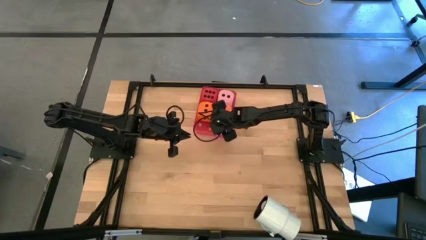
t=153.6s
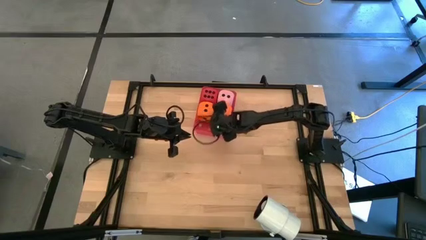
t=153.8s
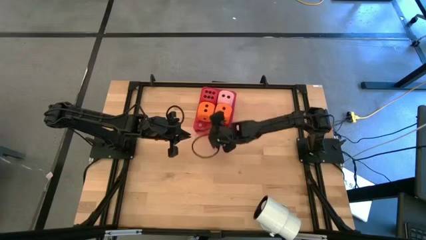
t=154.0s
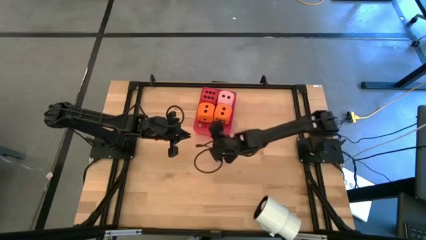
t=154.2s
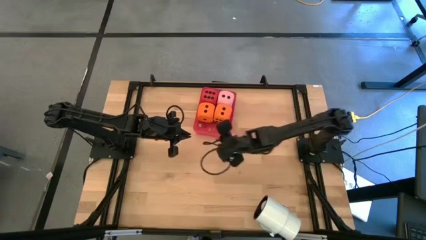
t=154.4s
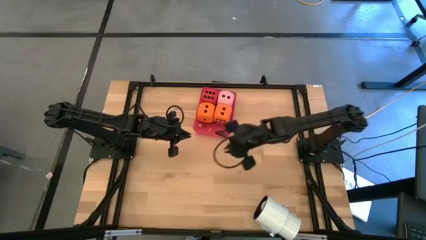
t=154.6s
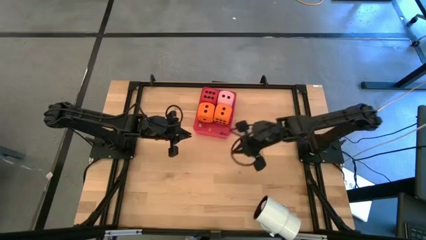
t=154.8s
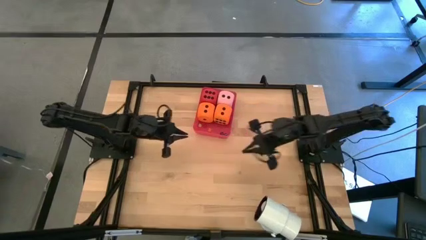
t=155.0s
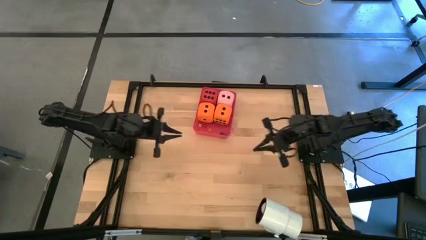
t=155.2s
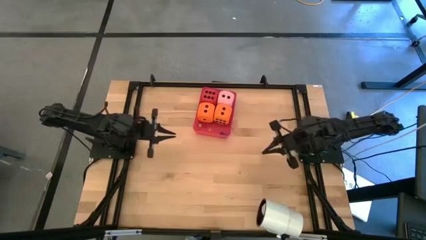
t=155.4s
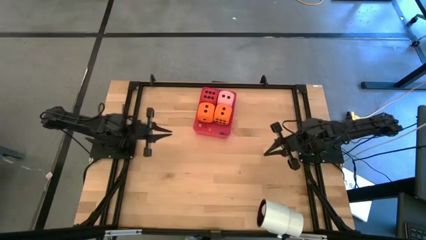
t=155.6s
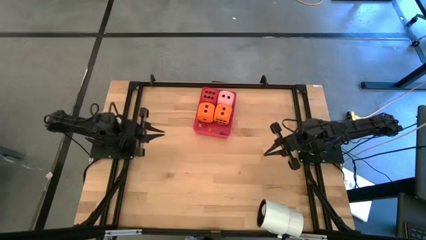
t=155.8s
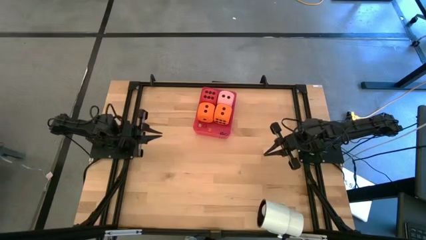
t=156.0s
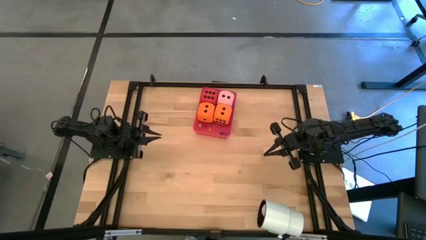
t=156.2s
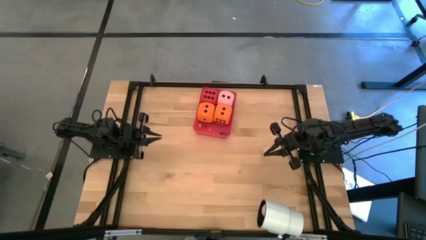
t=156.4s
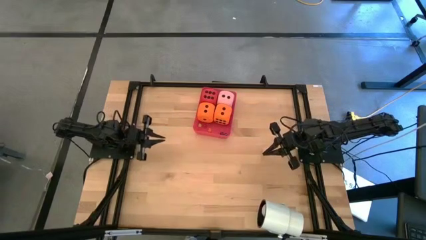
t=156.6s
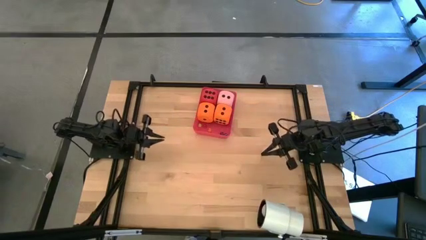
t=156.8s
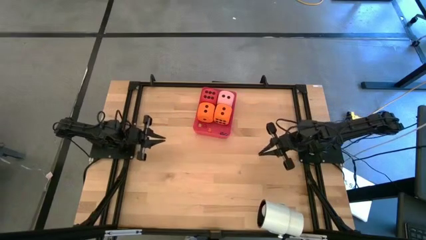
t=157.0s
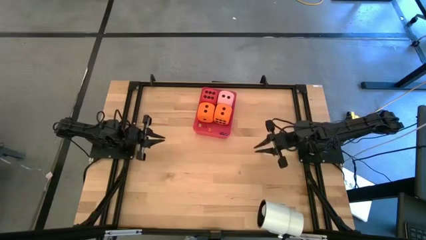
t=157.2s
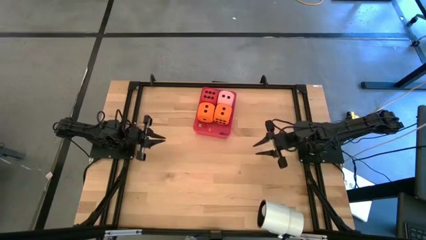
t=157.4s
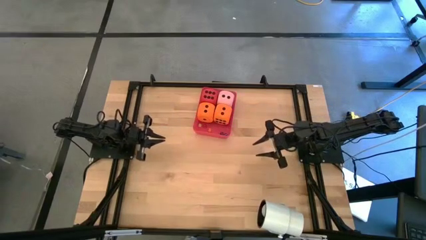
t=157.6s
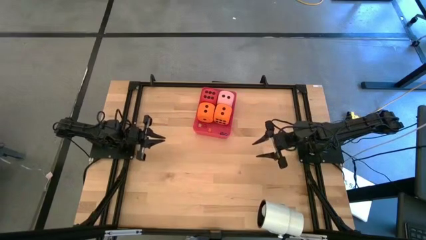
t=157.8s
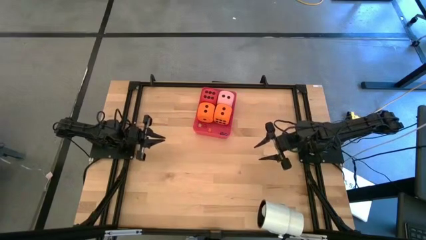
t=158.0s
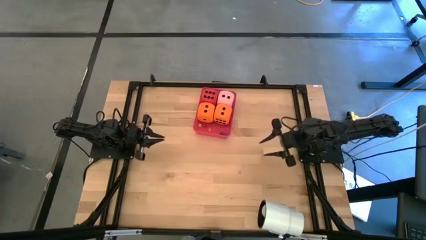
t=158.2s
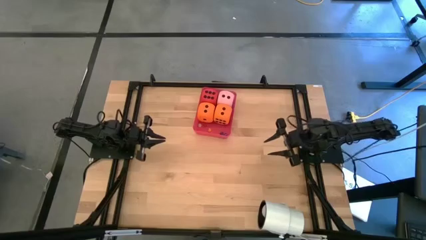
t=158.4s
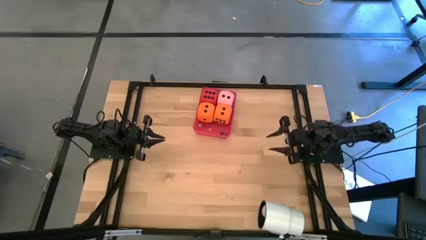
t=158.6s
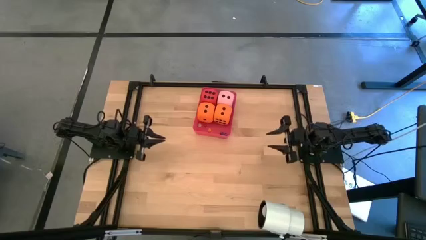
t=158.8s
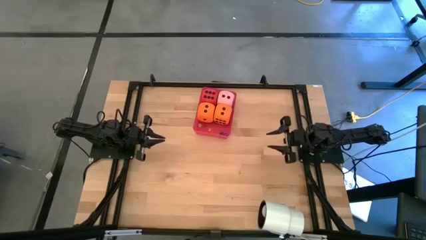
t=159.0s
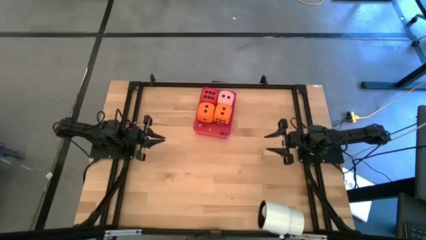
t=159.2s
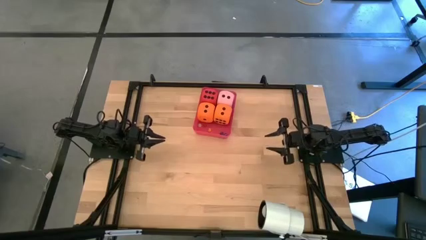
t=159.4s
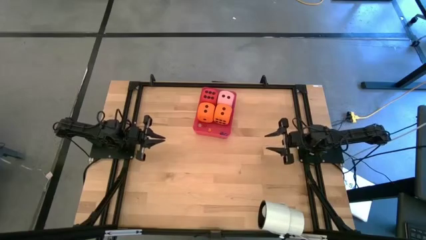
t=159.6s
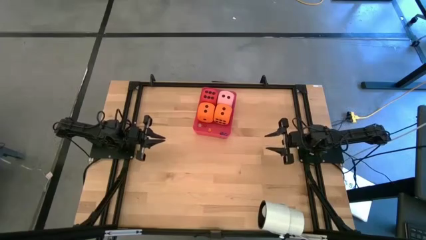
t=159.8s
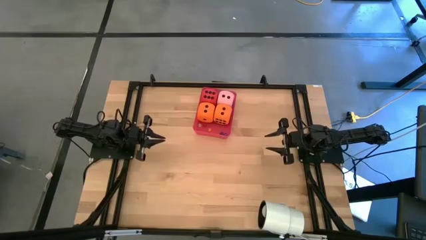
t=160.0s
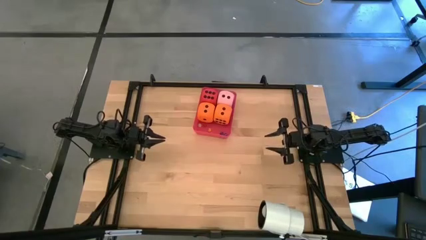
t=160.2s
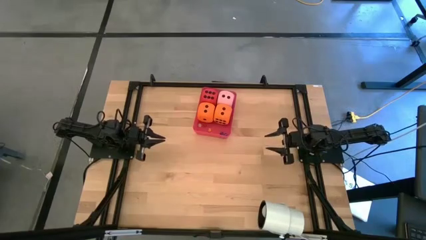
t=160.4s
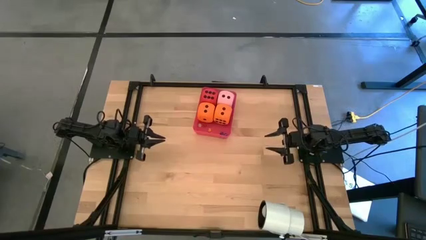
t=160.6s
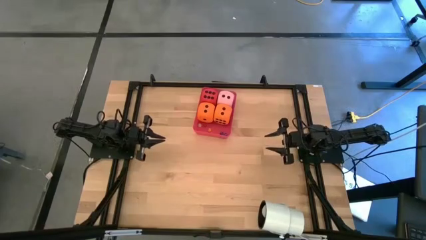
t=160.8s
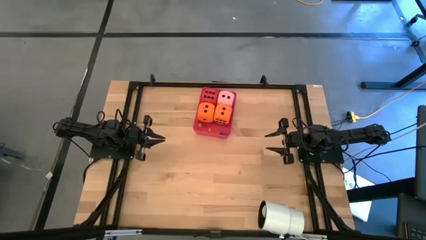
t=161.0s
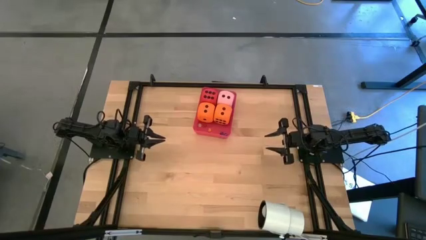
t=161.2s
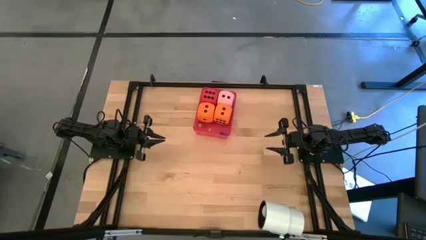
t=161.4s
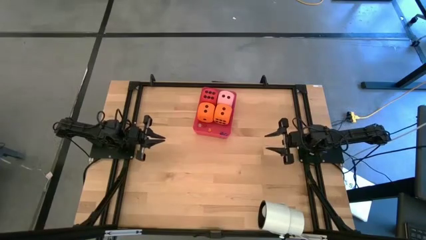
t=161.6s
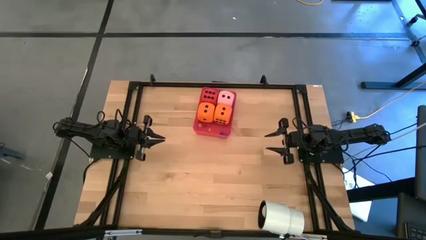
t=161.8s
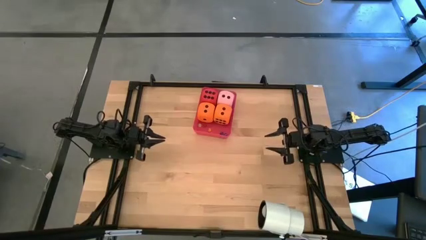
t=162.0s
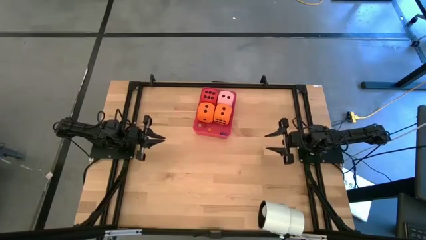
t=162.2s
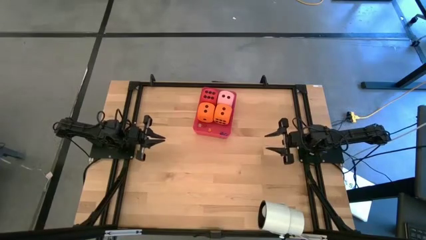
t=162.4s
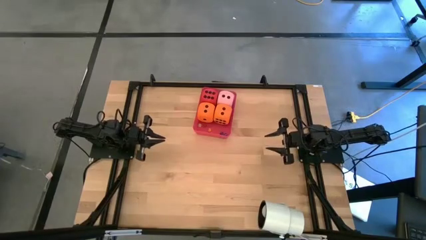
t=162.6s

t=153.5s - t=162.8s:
Task: Pick & Place Dice
Return to Home Position

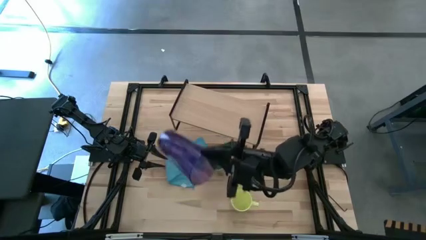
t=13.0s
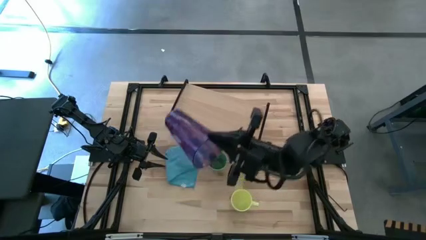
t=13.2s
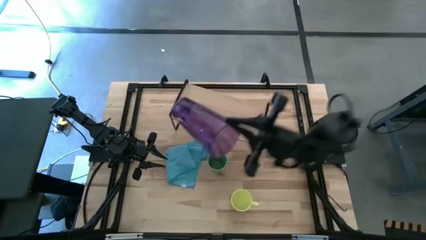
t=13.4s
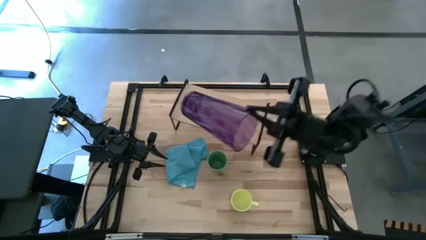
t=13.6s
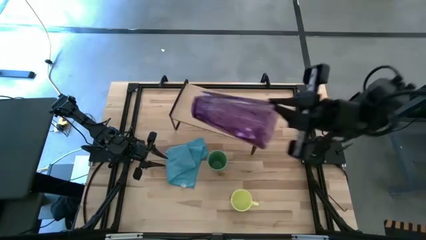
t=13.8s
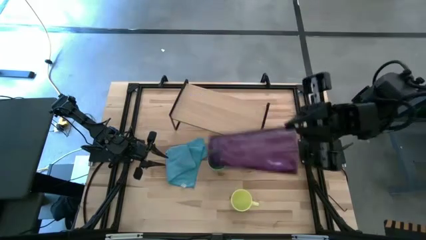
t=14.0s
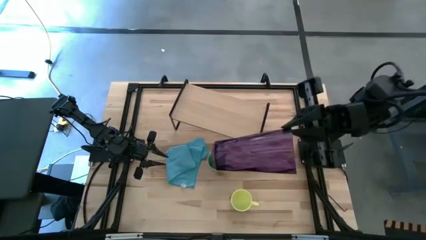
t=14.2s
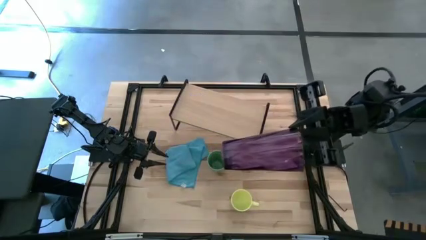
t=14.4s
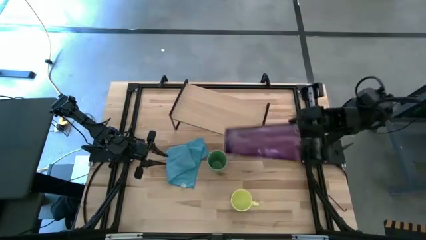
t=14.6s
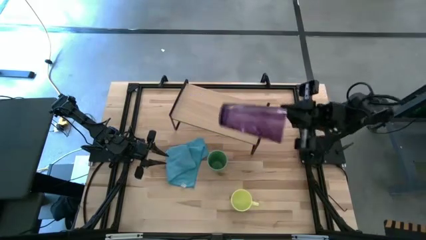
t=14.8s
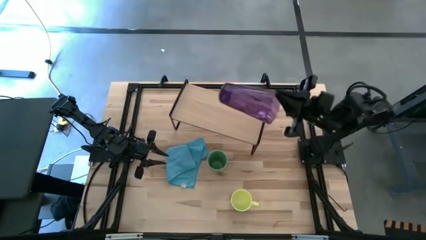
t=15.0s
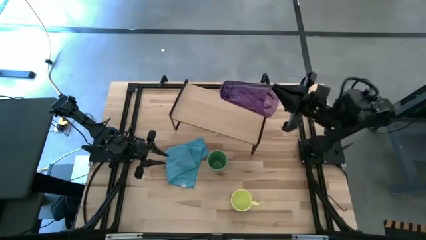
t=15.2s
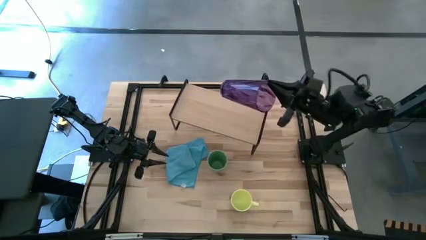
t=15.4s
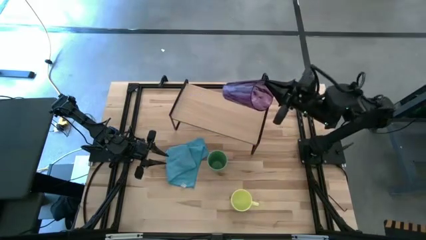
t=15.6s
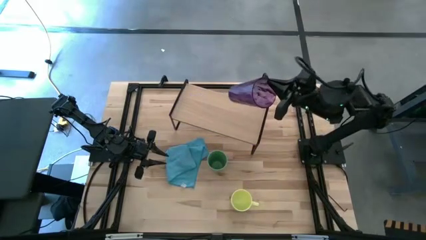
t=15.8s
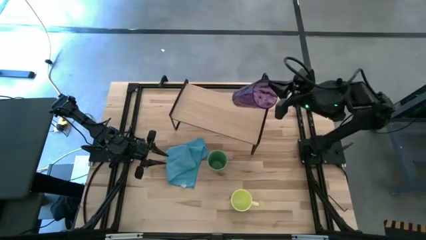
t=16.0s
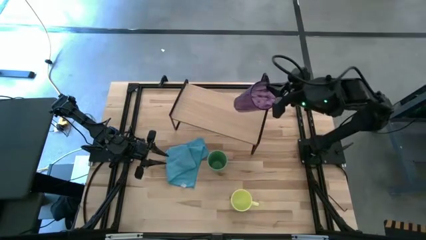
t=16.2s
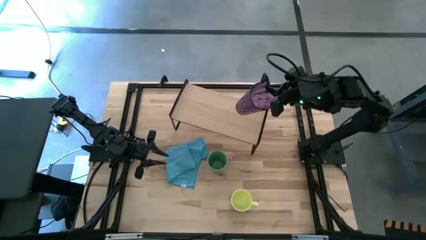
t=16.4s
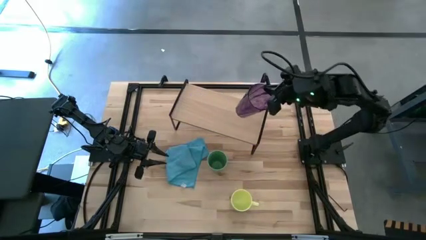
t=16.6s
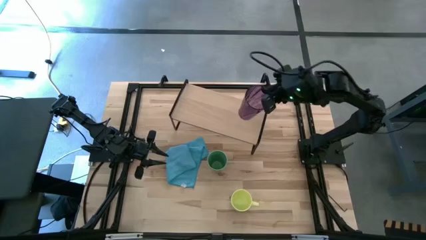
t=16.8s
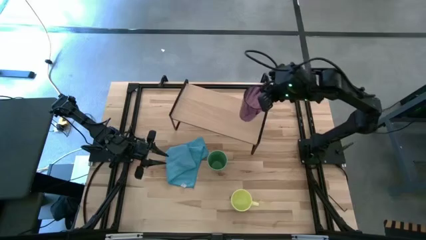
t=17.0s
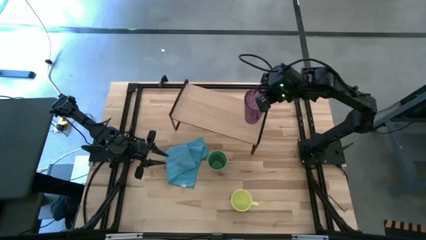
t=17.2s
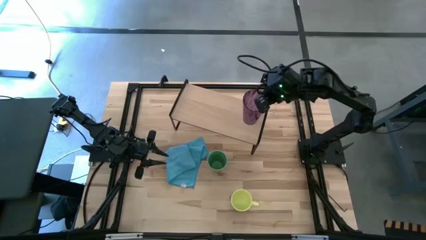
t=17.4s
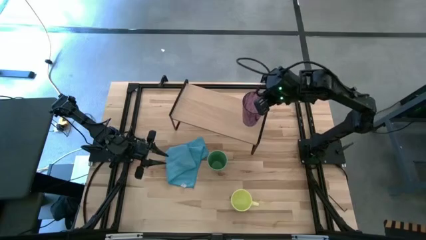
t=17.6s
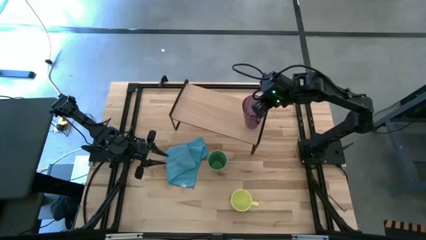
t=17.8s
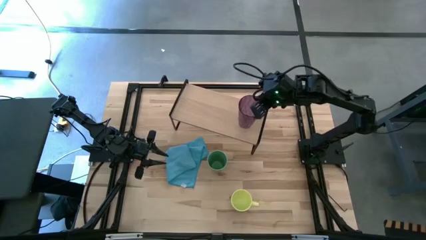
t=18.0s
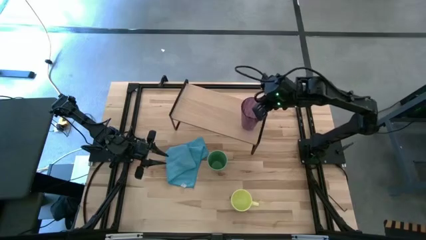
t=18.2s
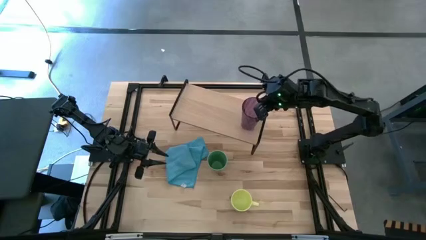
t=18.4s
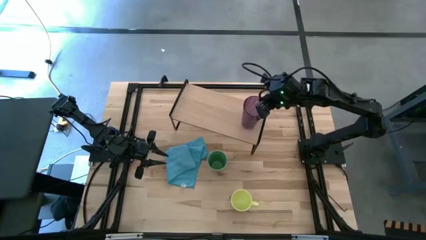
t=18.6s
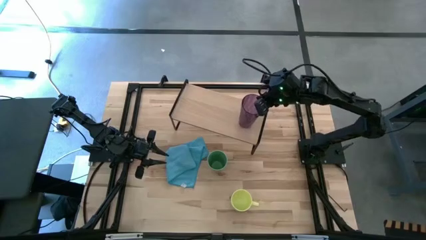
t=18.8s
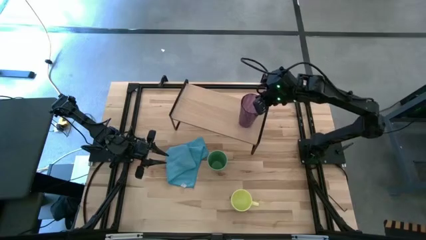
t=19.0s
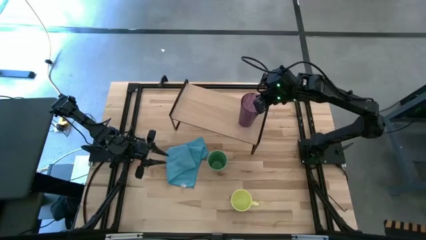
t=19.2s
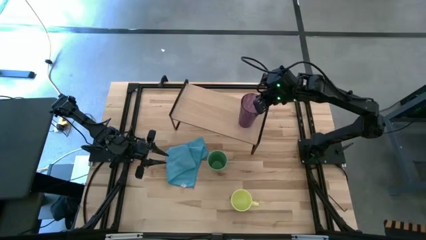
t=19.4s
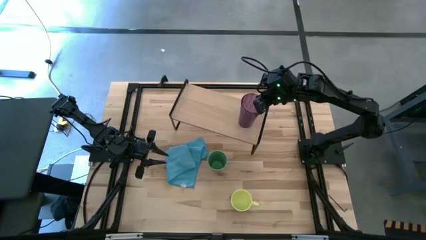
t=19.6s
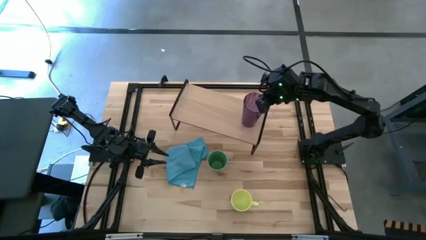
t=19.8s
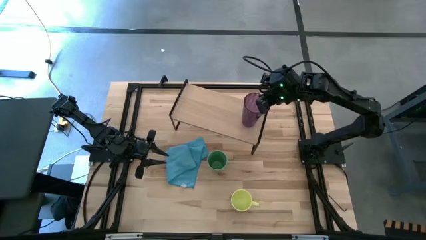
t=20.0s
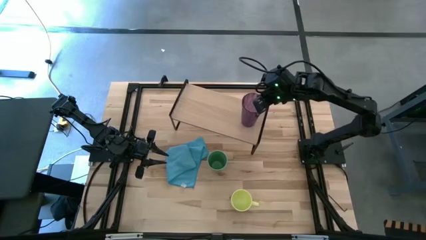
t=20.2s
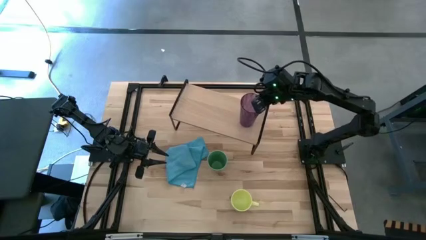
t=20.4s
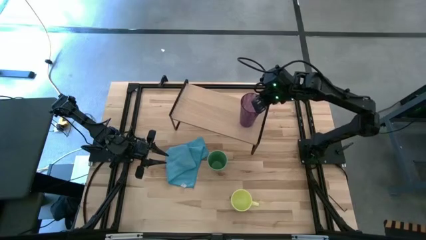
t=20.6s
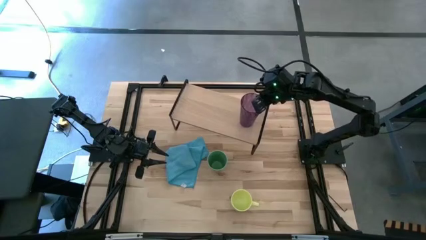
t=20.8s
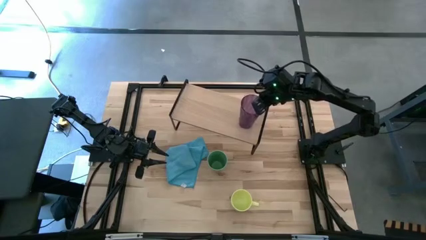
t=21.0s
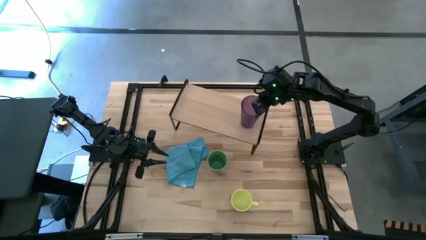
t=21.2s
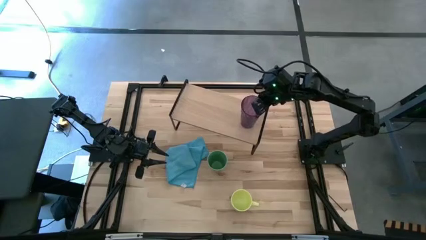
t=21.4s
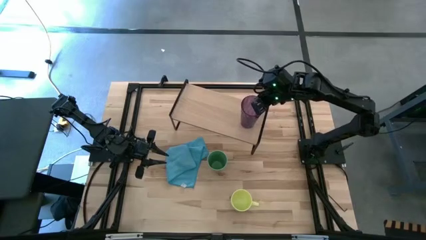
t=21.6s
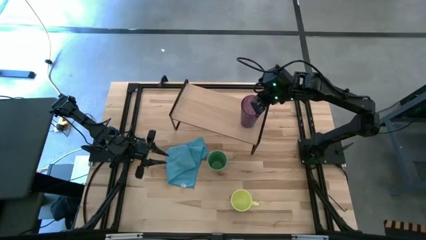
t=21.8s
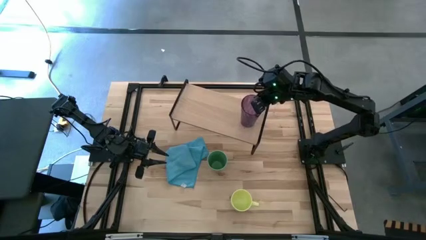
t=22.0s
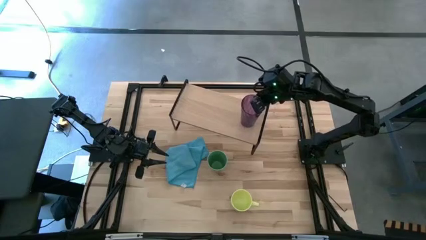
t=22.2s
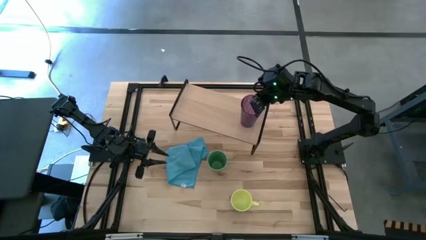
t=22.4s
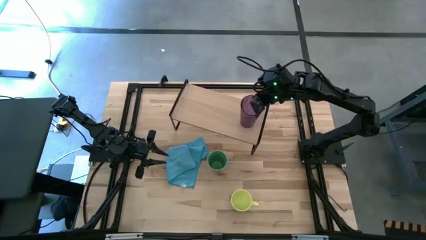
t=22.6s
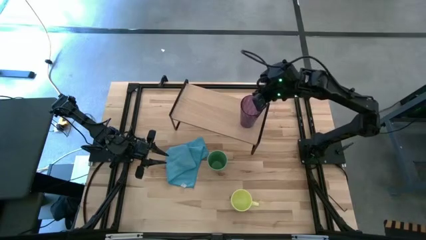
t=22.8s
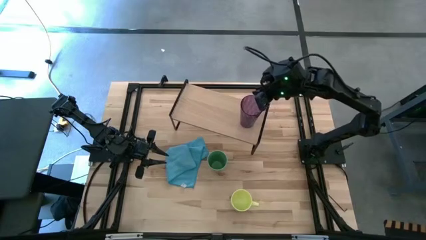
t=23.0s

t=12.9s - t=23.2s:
Task: Stack small to large cups/mugs on shelf
Put the purple cup on the shelf
